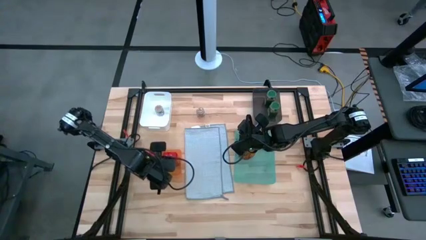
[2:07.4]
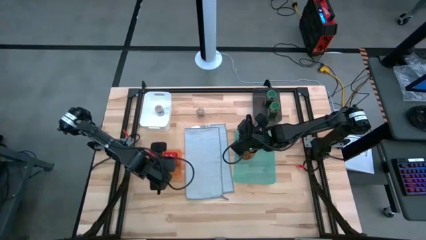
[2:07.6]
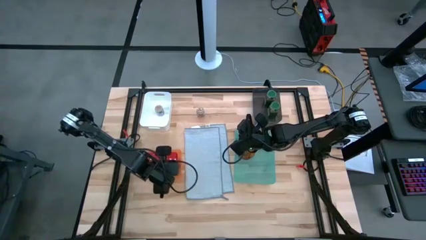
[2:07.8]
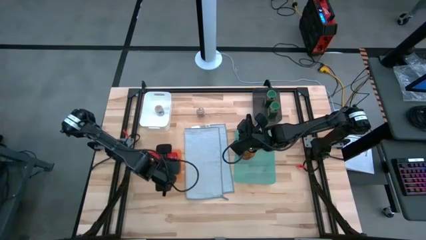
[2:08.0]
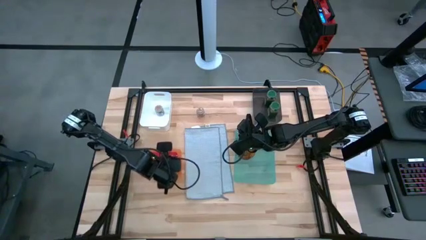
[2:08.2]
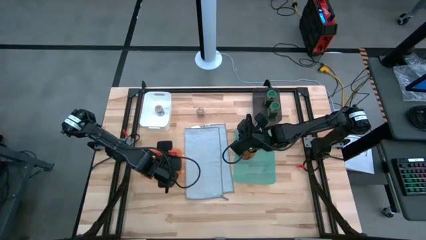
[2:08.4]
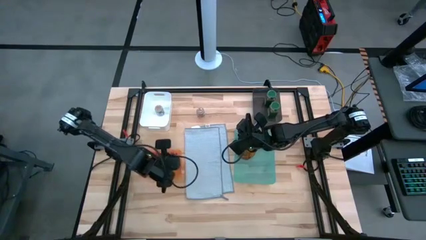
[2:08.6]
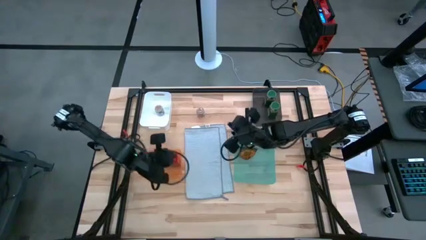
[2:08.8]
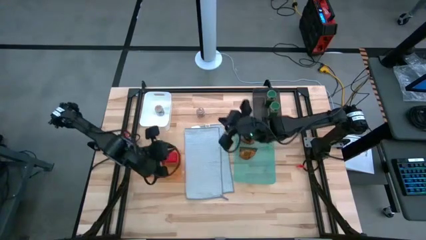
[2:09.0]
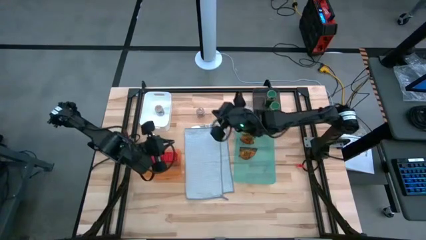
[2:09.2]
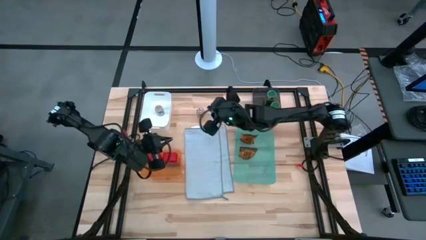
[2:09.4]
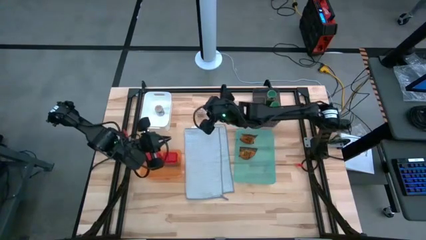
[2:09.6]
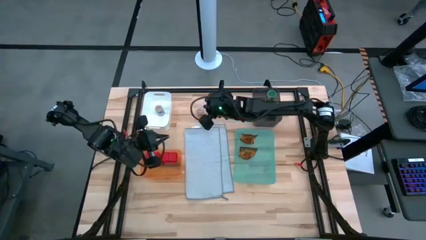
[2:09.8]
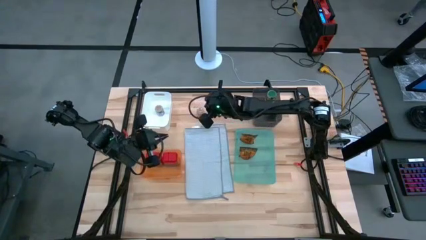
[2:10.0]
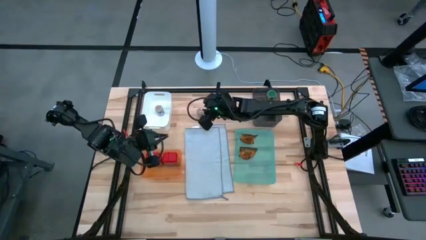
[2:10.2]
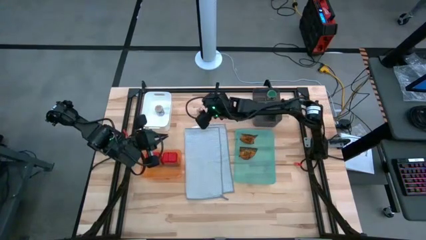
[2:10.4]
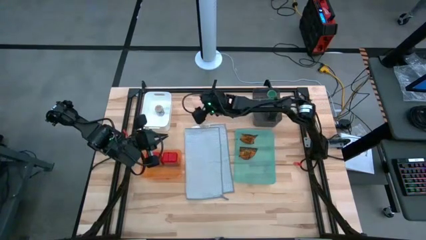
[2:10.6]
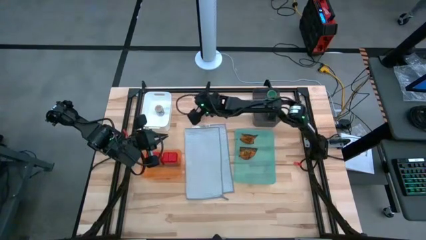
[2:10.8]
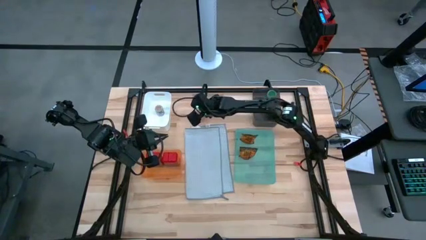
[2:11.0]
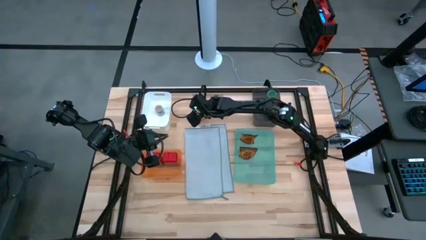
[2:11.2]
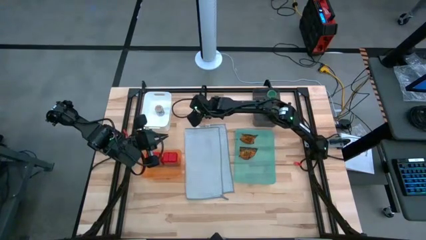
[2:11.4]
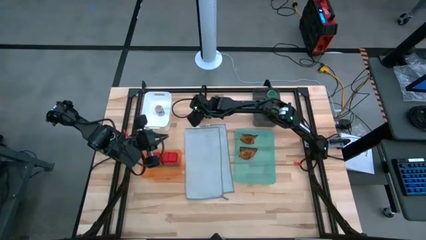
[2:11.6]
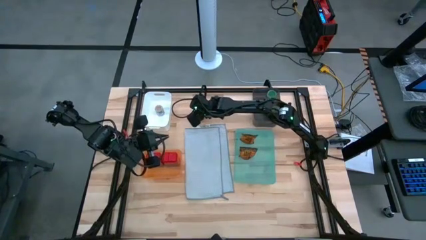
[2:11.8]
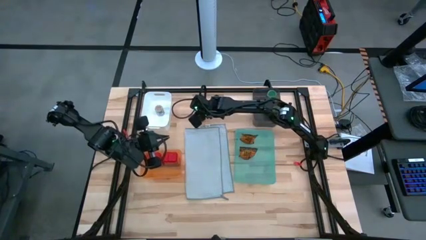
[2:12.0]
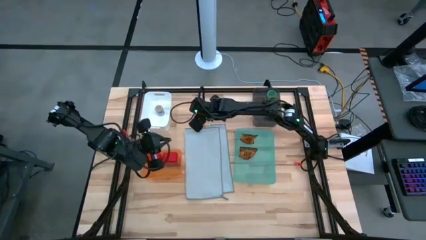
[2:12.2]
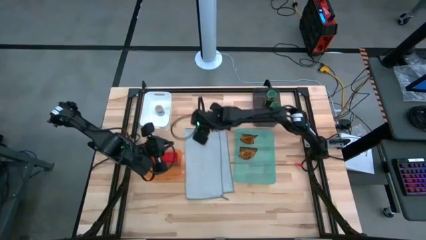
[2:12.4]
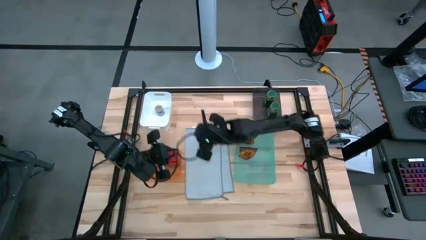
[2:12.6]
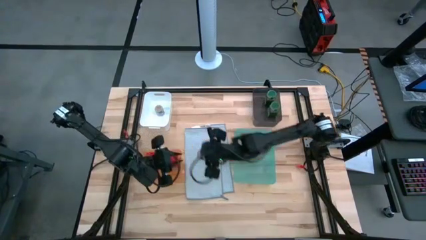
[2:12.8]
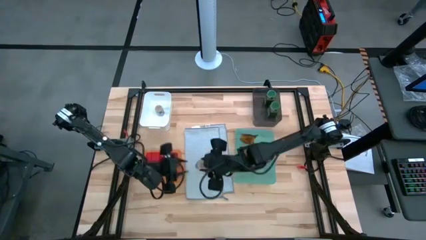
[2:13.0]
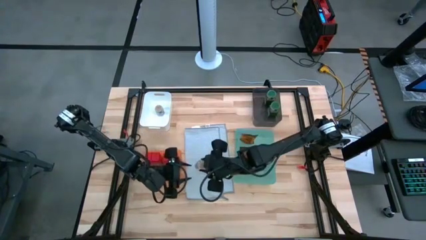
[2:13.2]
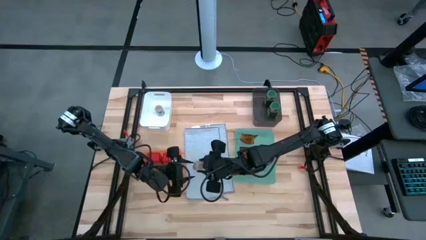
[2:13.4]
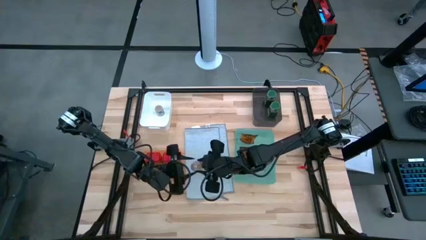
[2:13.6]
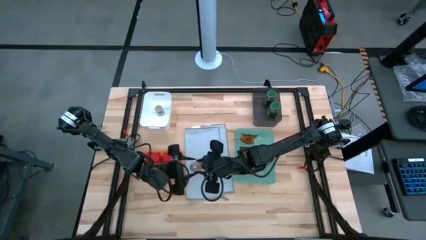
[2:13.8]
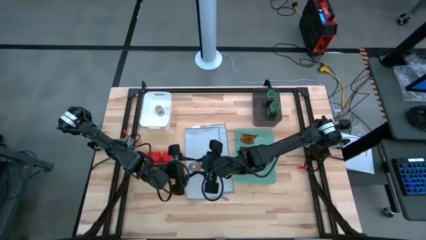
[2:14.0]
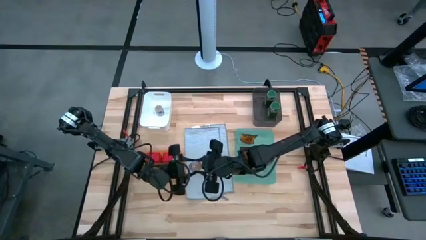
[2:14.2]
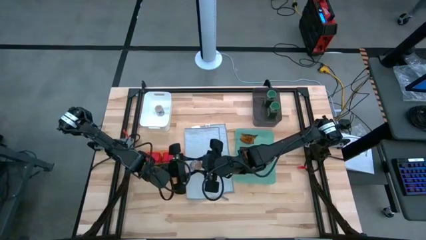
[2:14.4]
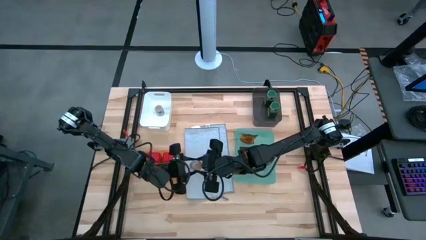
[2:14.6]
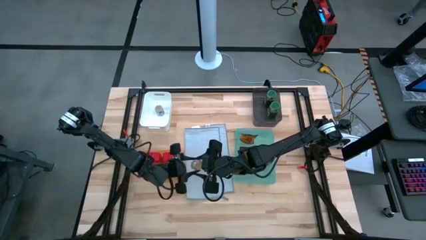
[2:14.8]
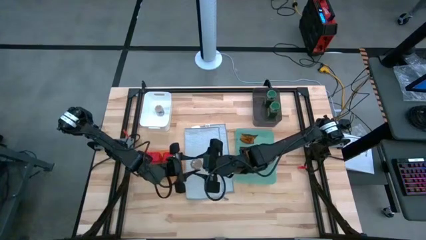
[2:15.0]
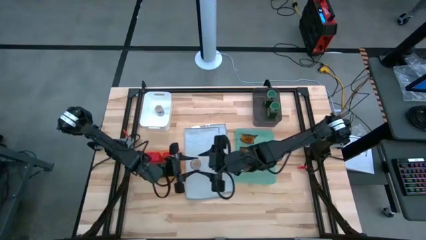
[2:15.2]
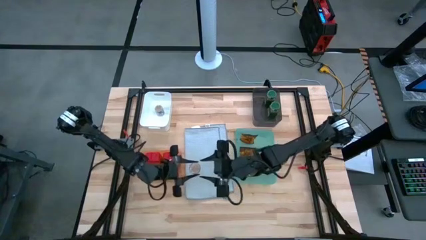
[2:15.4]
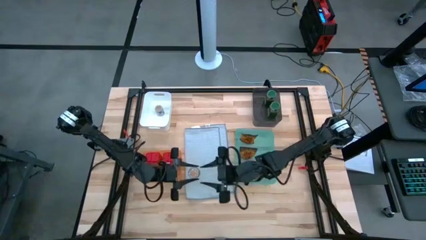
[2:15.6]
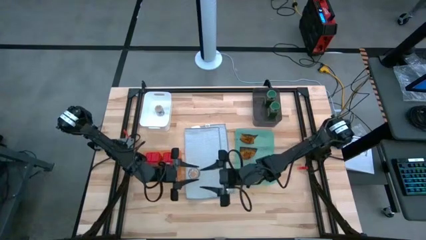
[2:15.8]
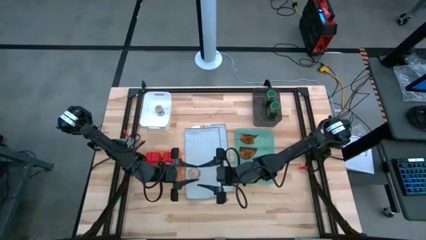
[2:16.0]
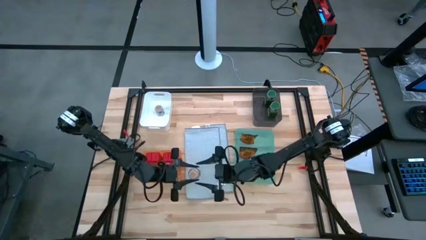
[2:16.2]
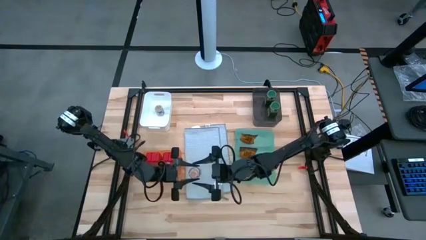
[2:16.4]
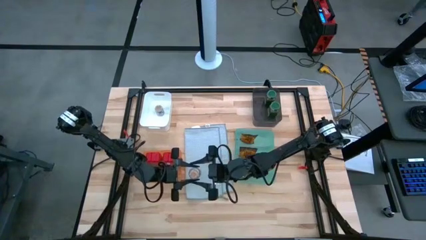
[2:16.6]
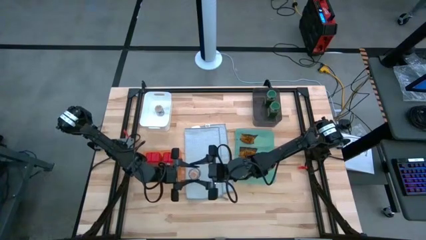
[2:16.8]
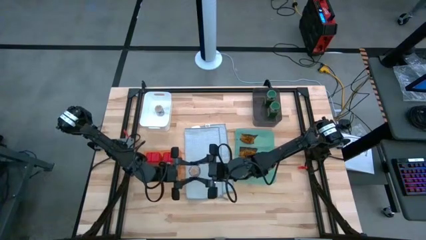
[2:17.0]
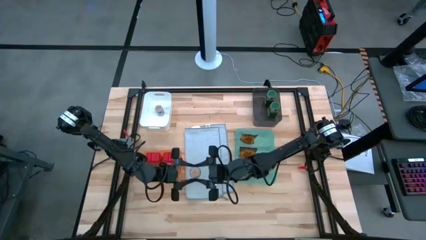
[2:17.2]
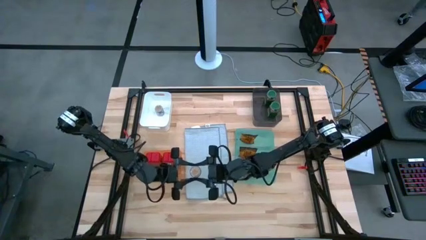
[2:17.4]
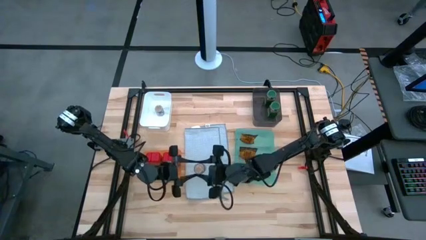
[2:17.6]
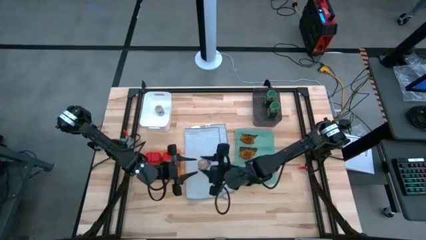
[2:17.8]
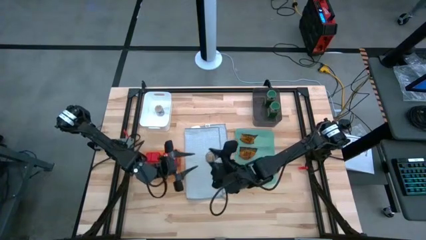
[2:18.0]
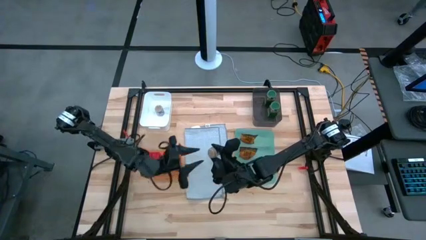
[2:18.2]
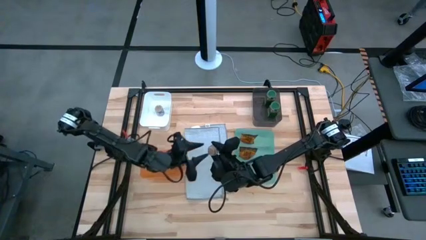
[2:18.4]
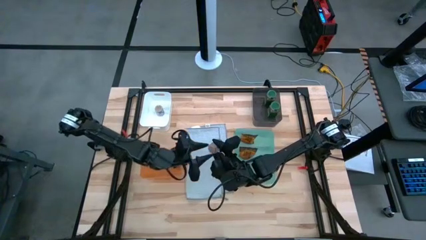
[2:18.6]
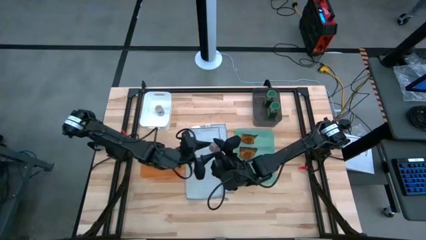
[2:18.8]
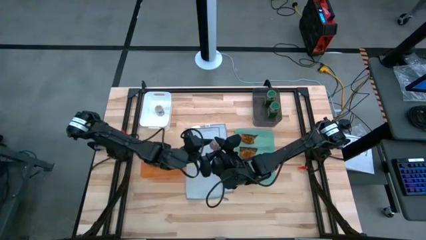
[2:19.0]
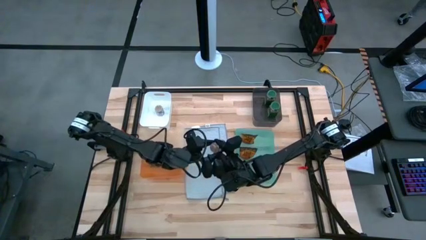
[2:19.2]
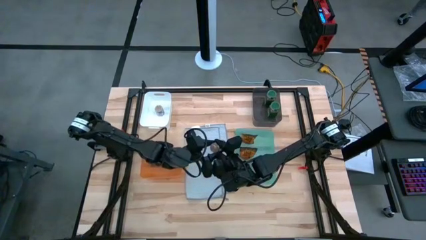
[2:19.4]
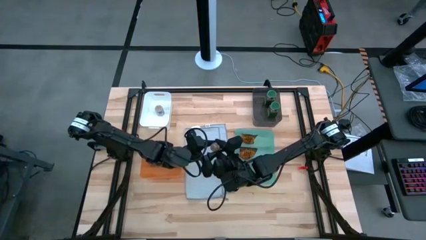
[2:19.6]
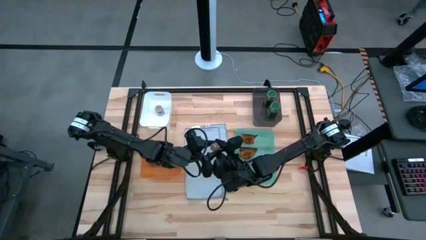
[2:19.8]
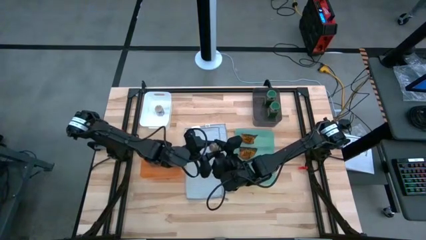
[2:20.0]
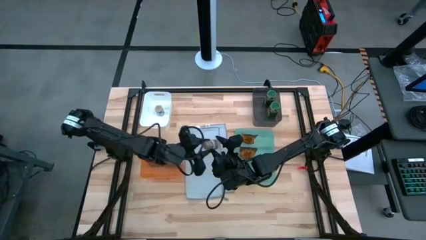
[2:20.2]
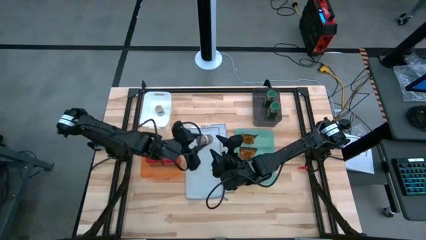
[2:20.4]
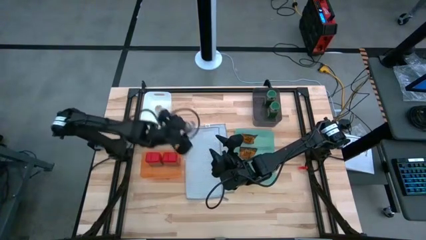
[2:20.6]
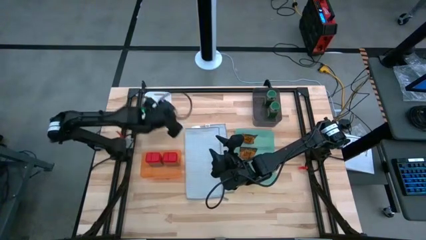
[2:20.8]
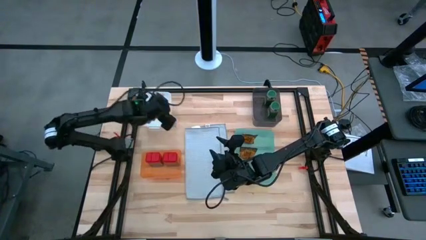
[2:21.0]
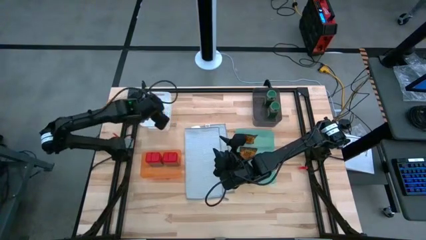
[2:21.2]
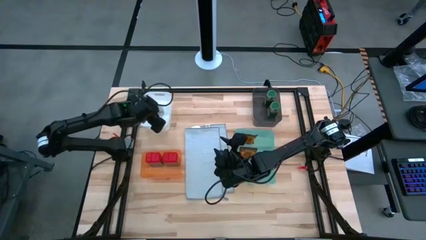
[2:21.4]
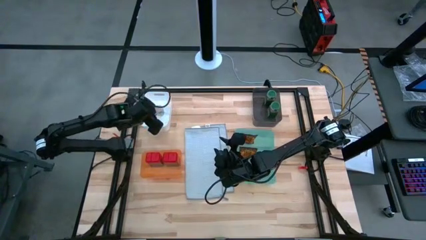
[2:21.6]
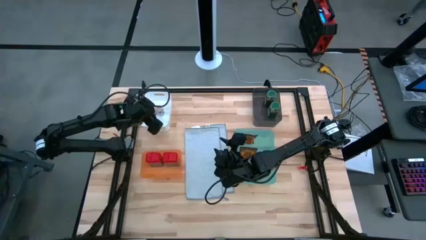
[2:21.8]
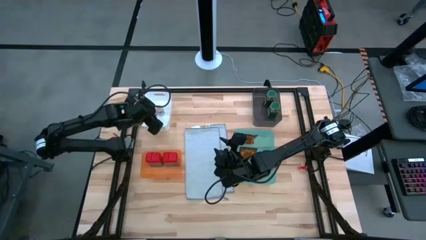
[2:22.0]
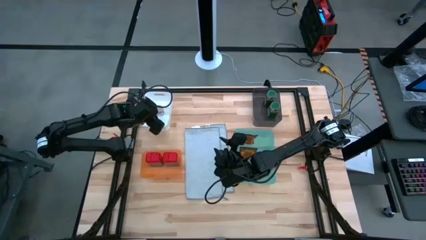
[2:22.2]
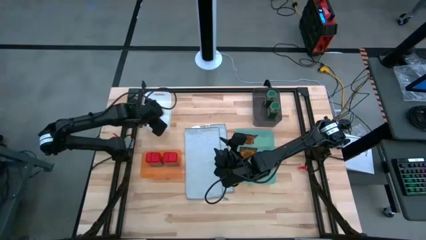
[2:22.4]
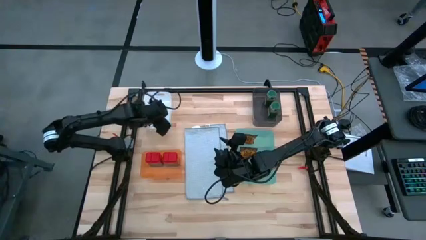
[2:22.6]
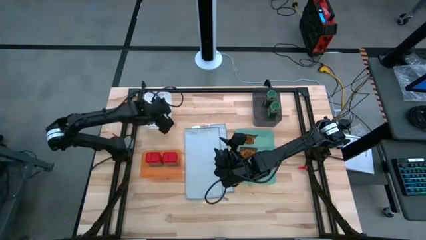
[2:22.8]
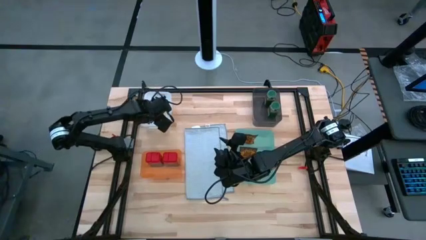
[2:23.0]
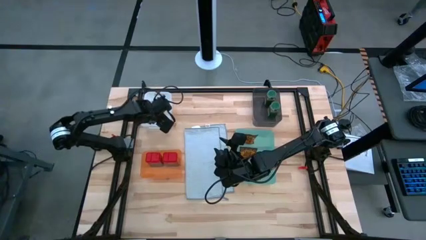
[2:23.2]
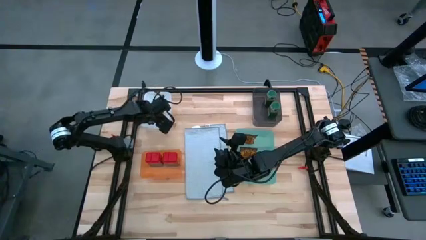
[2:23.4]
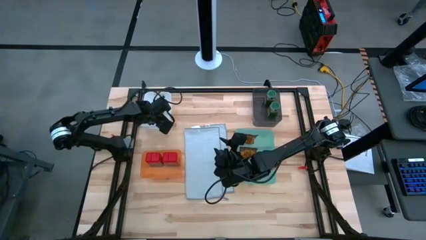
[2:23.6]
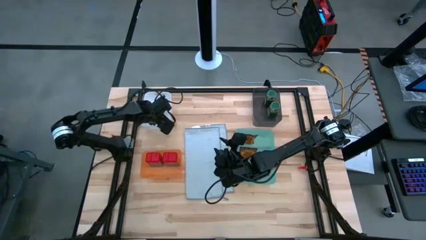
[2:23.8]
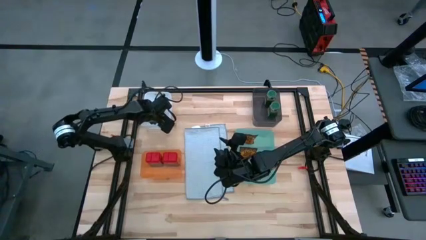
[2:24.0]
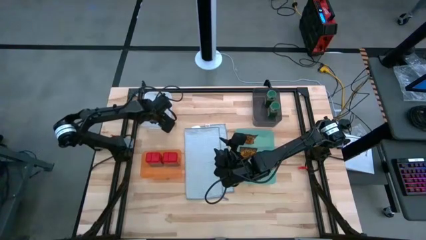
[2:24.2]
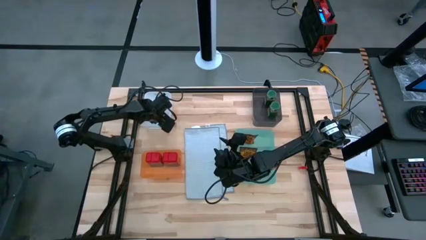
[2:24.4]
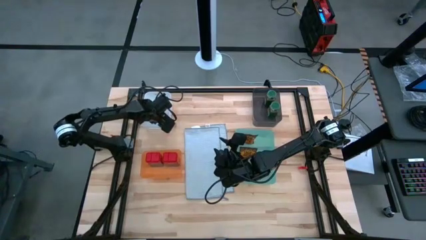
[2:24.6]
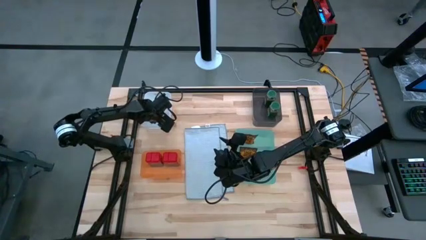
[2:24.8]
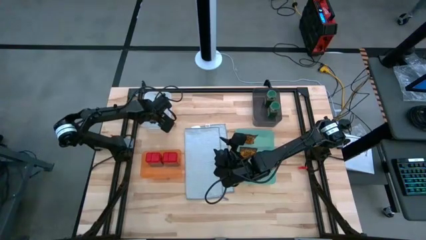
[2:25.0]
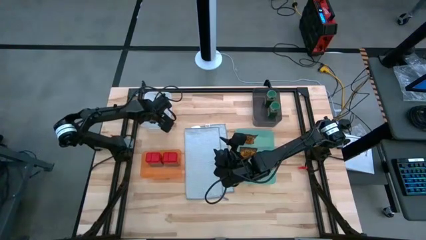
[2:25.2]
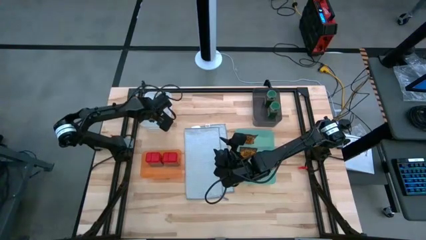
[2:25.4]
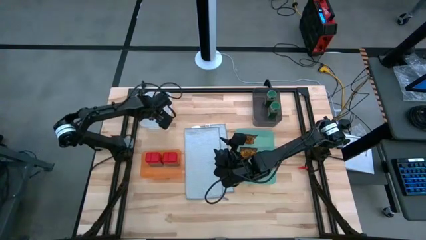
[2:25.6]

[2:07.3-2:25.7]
Task: Sort spices by type
Put the brown seasoning bottle into the white bin
